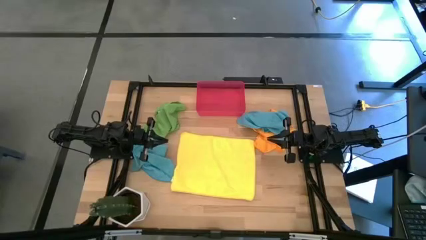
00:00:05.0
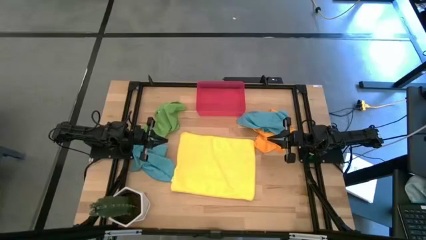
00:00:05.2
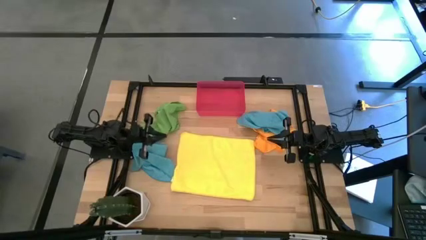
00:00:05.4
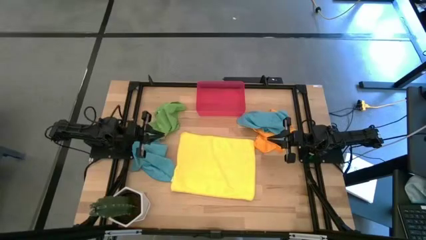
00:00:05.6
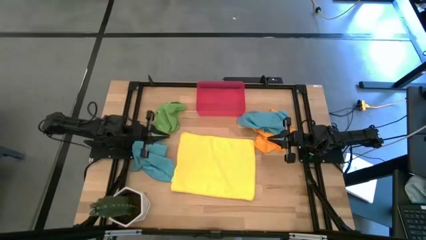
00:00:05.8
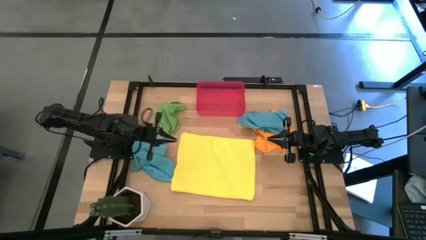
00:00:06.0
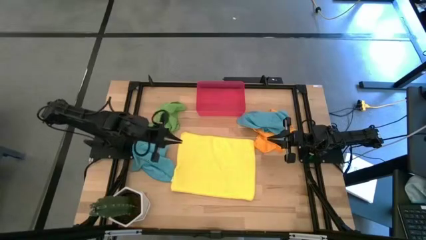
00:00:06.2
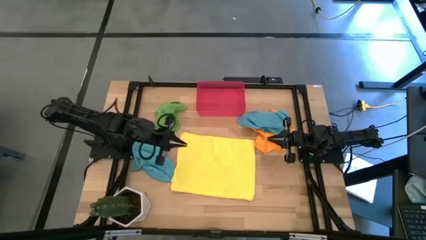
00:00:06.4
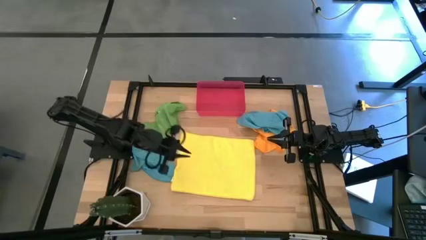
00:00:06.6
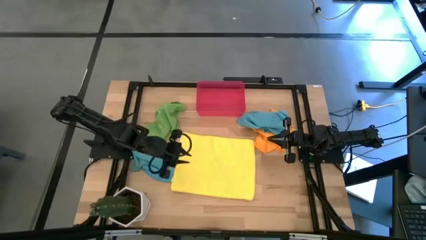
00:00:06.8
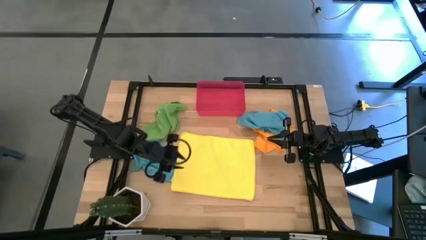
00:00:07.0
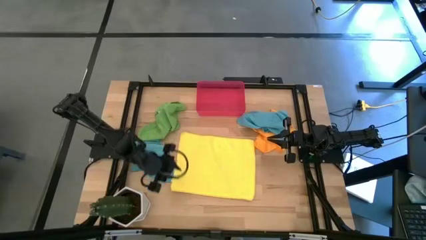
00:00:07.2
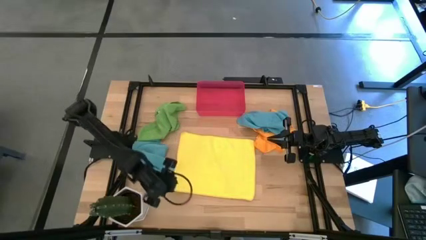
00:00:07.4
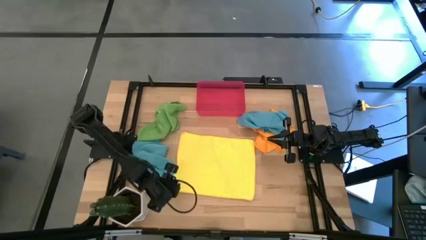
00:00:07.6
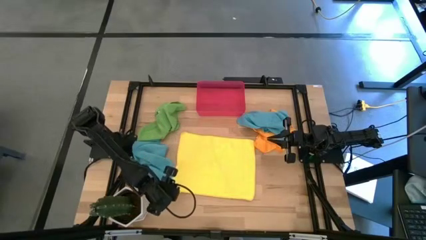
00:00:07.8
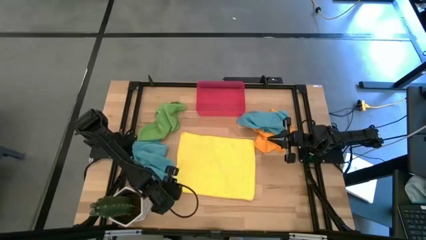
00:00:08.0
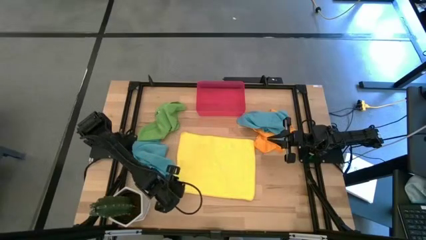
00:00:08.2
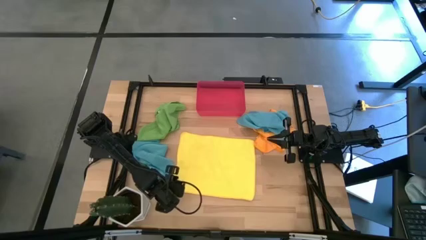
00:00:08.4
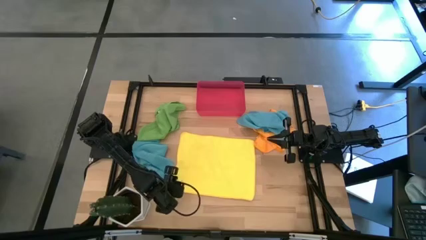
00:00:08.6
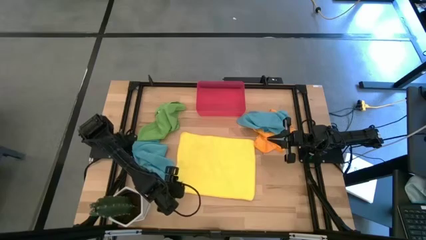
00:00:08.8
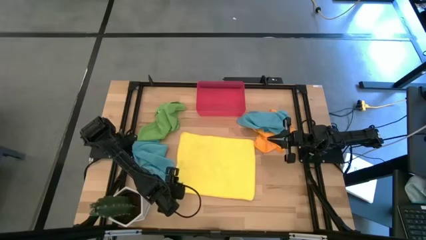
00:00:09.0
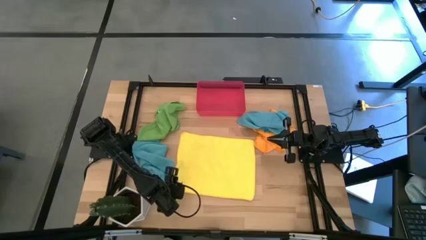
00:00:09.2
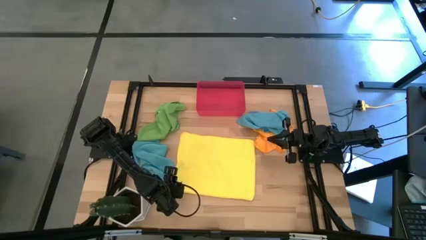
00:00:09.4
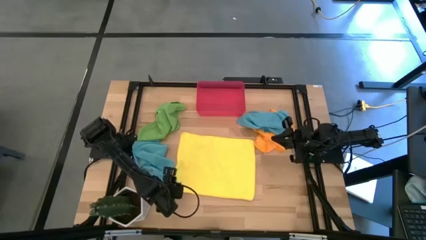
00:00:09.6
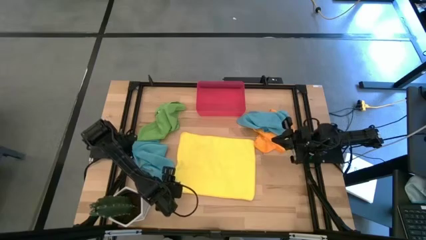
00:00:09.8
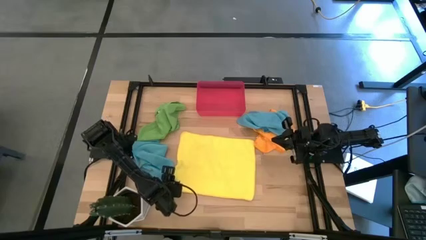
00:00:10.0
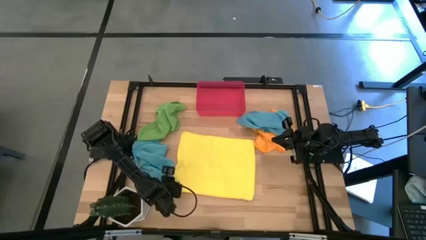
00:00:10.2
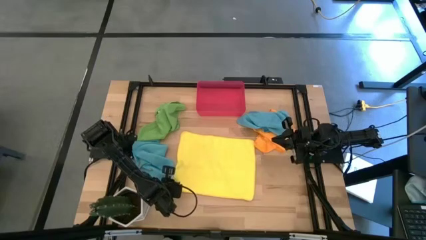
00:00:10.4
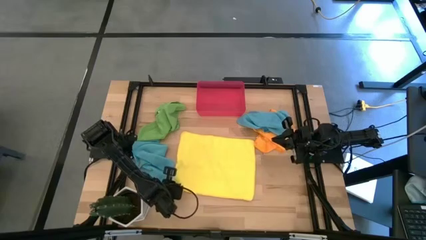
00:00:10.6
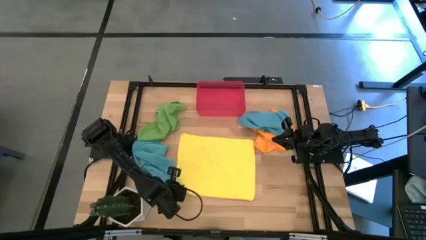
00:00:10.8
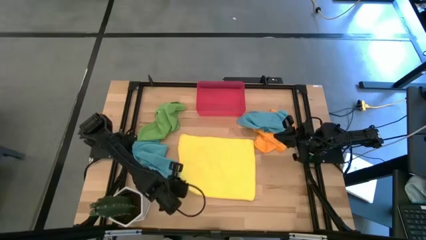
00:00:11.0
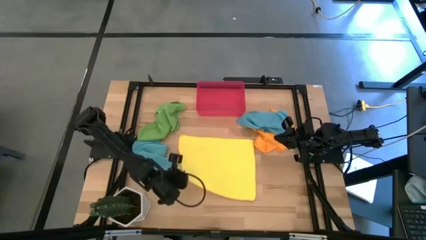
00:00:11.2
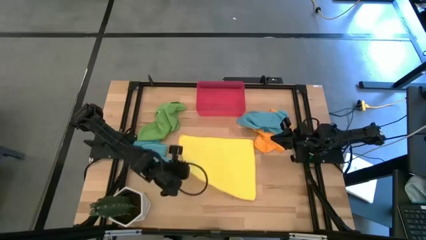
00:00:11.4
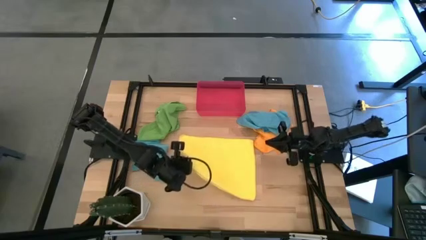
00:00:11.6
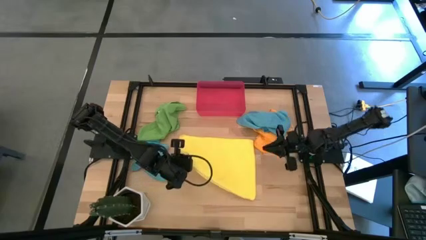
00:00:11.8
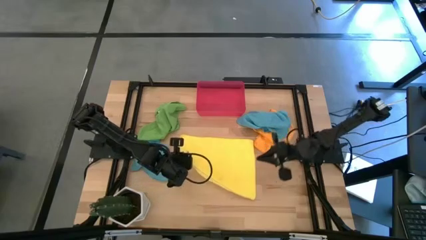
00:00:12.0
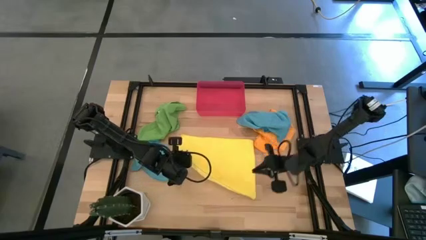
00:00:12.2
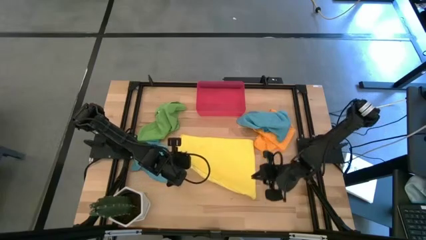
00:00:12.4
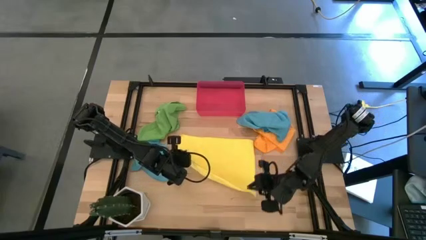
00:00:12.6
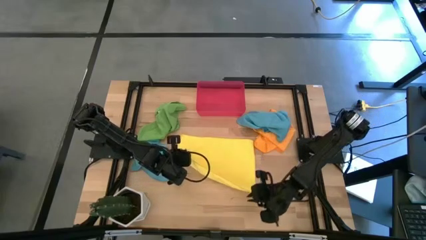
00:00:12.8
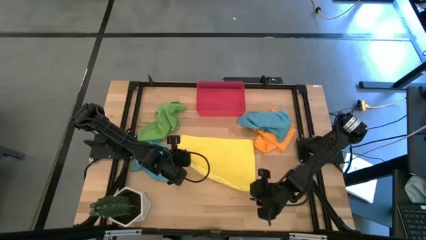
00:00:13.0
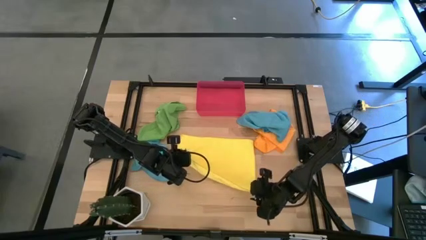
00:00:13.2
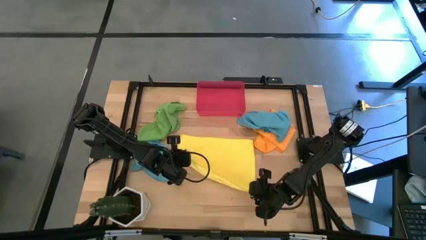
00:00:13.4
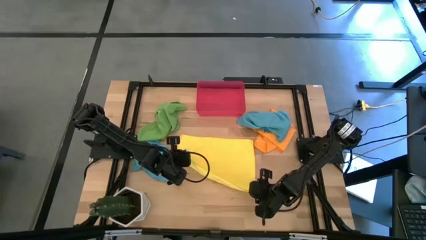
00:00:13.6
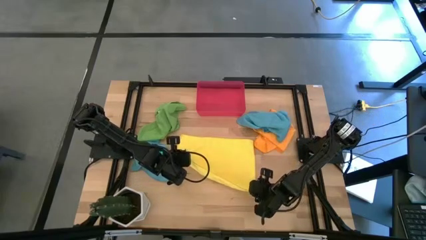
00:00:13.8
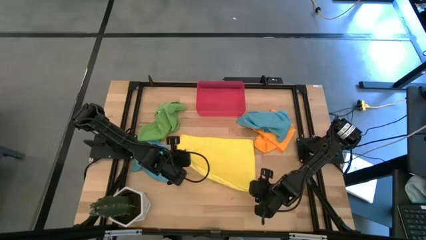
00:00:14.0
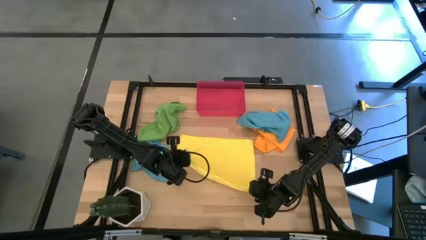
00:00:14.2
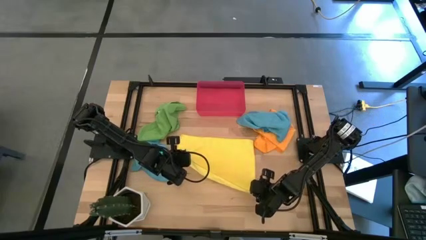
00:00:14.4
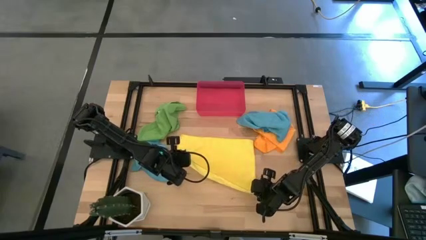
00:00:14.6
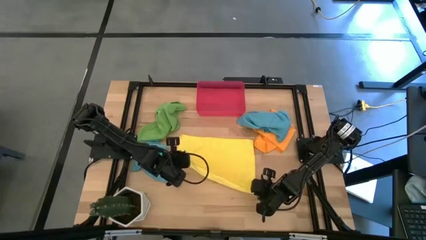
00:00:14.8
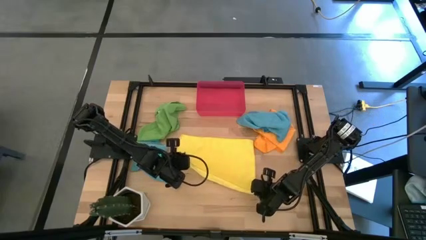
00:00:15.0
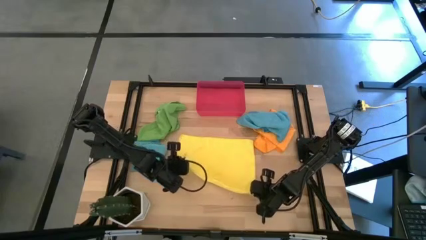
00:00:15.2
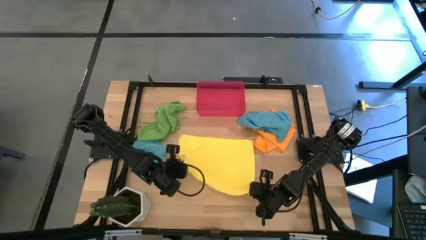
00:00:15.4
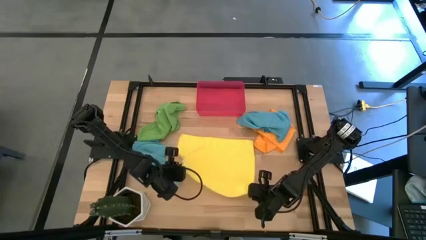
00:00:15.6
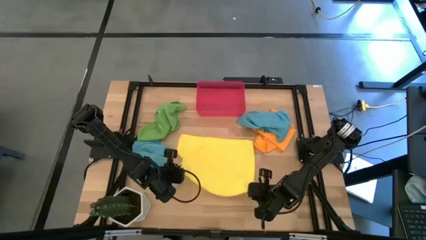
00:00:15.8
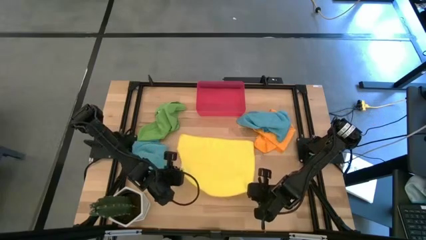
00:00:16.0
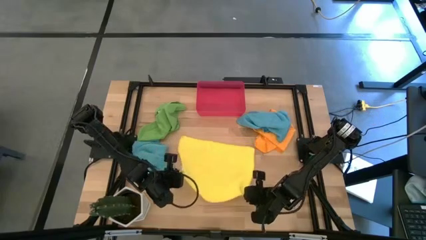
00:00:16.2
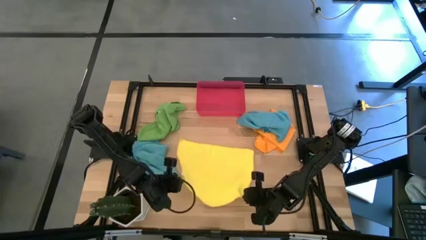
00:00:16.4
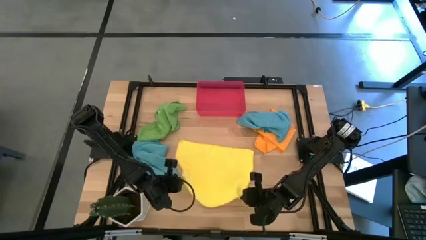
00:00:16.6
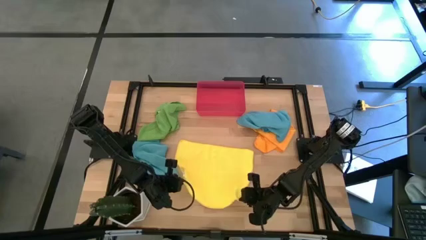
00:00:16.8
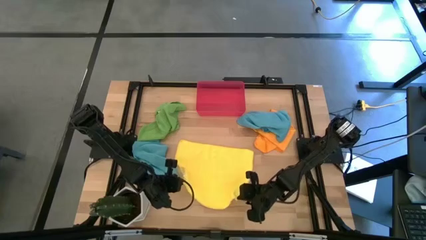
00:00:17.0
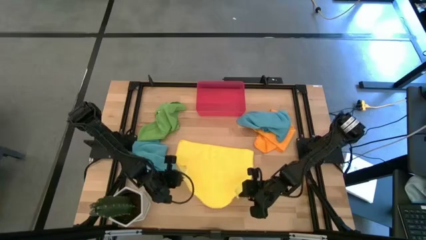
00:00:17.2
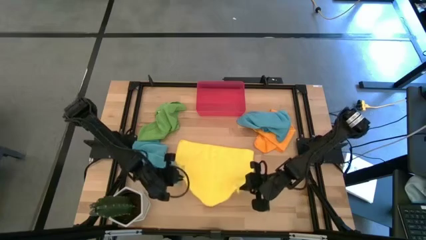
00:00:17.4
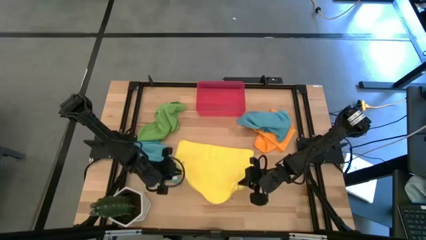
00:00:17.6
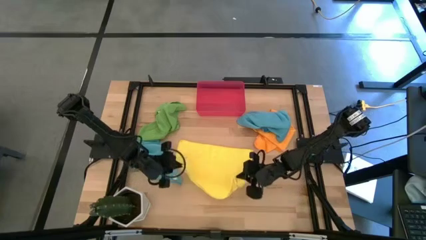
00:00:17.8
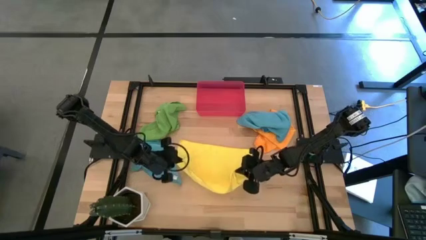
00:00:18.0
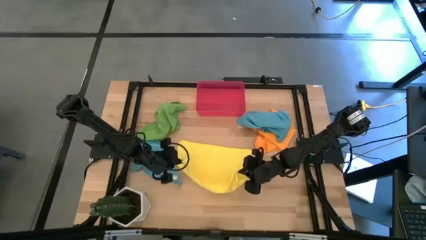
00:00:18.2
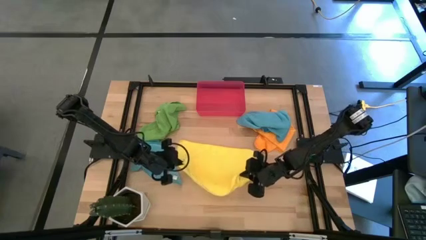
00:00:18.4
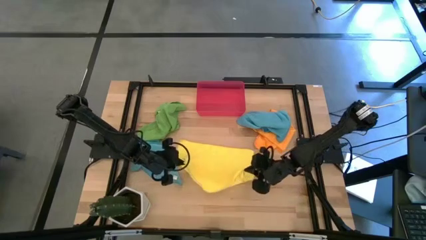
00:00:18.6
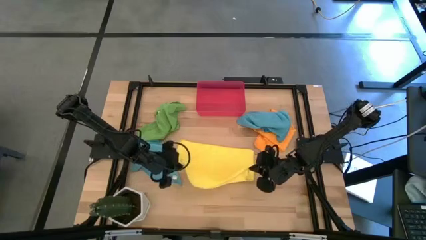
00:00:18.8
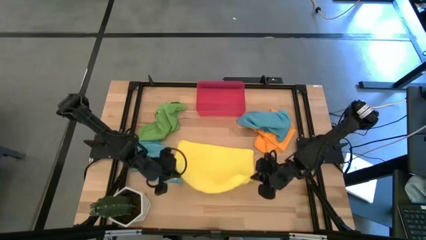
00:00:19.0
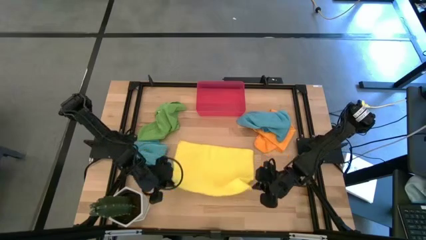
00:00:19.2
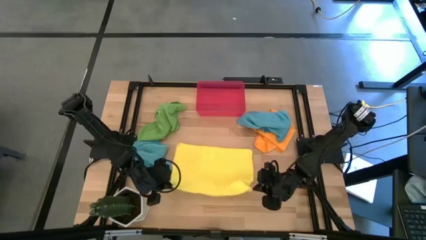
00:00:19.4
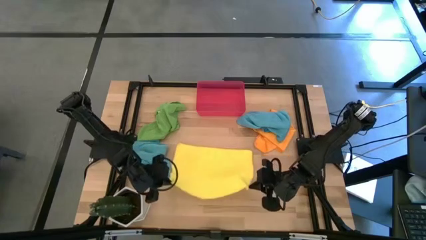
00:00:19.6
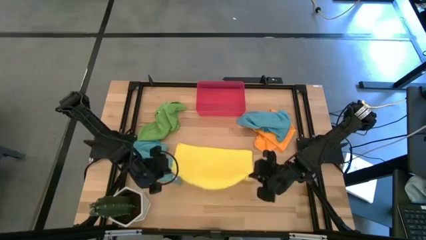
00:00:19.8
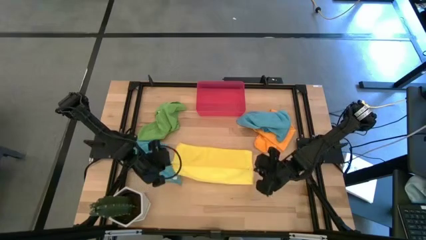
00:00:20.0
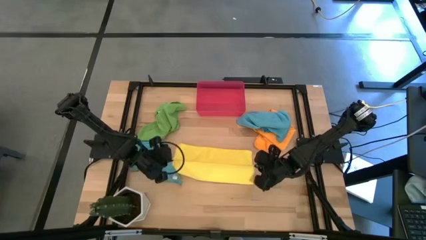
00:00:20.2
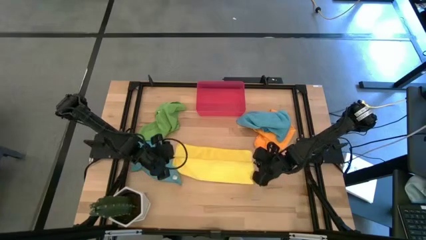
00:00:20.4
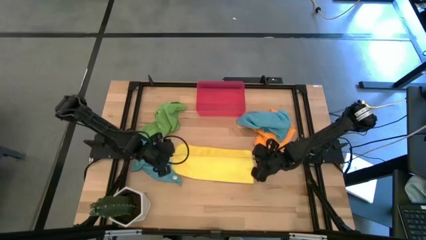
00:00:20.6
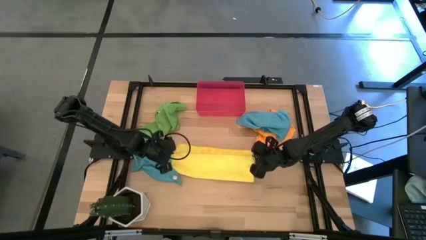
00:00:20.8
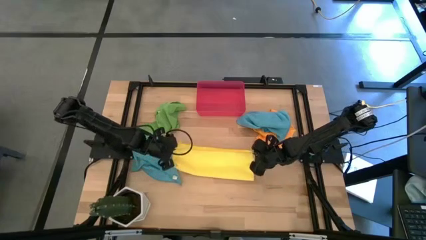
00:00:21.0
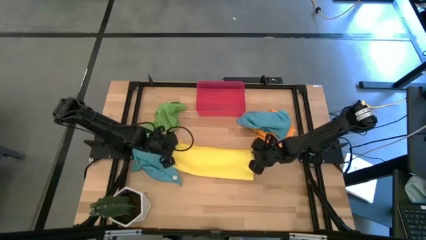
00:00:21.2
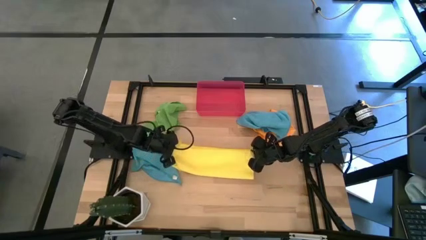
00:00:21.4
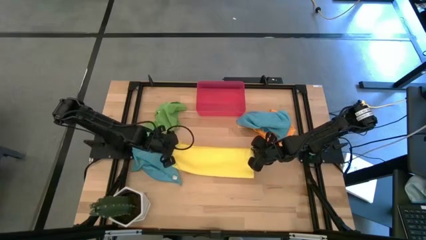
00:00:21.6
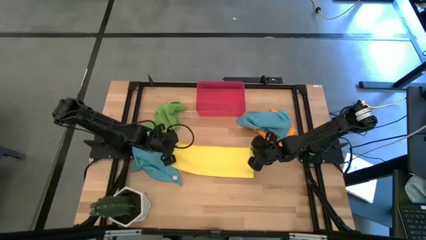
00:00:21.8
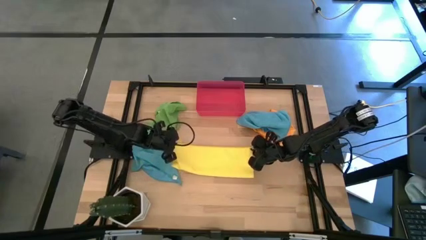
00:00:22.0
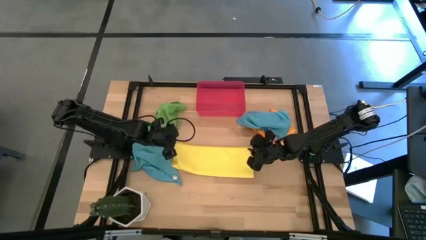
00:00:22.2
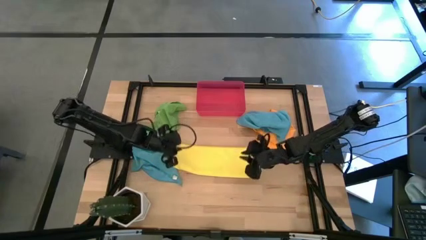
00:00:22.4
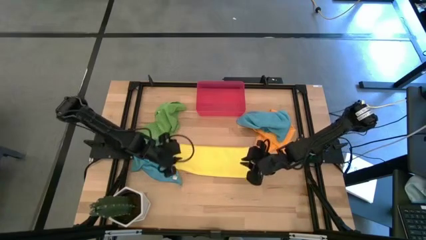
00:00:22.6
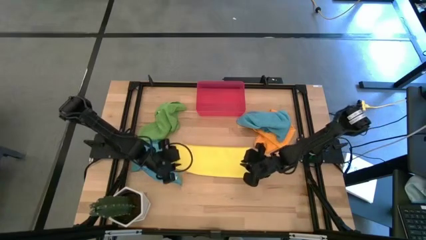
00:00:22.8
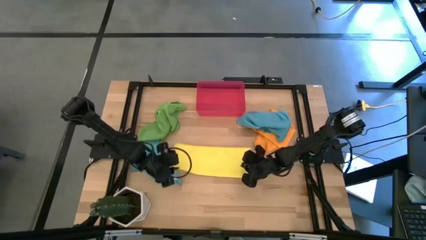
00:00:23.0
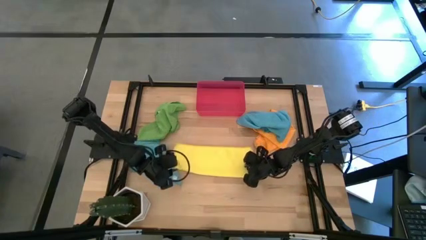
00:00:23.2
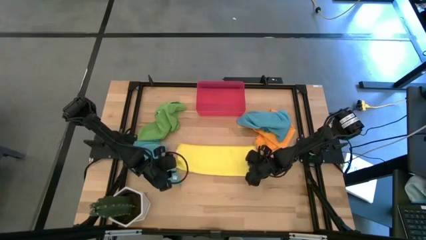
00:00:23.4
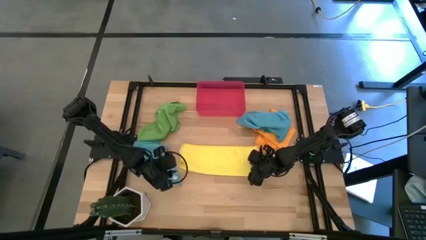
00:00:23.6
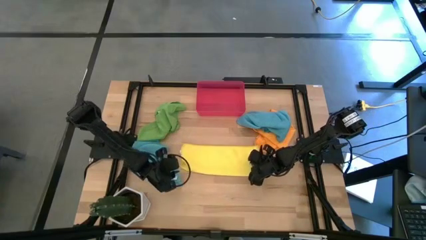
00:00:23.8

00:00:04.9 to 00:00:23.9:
Task: Roll microfiber towels into tight, uniform cylinder then place into a basket
Roll the yellow microfiber cloth
